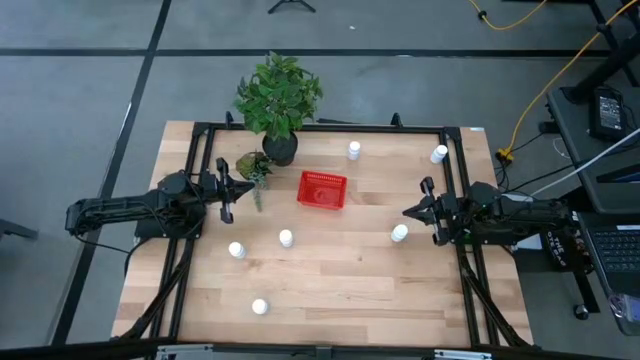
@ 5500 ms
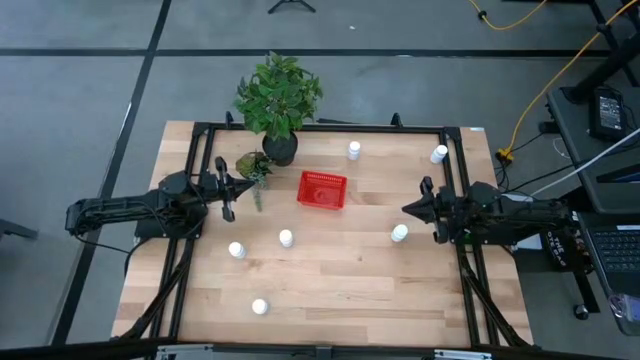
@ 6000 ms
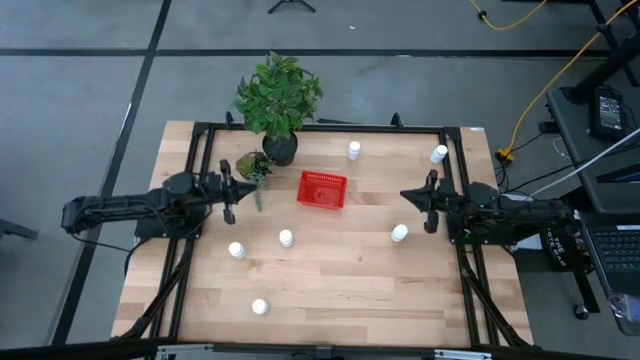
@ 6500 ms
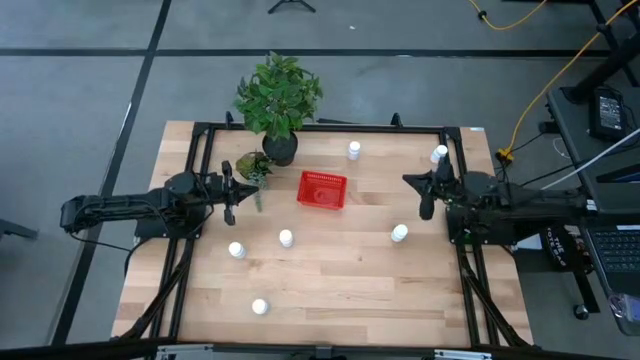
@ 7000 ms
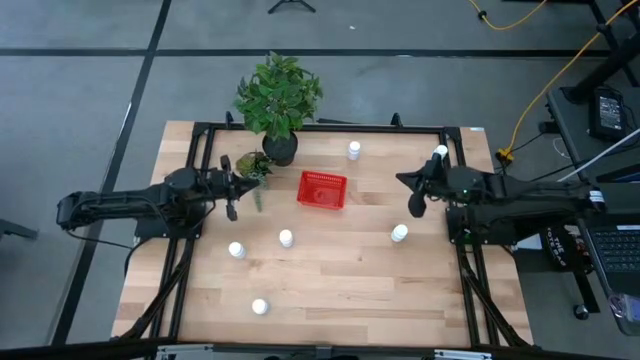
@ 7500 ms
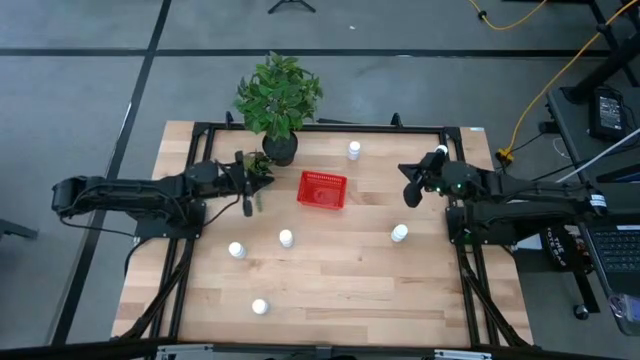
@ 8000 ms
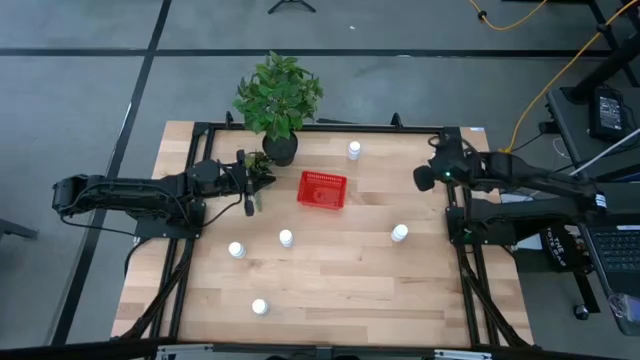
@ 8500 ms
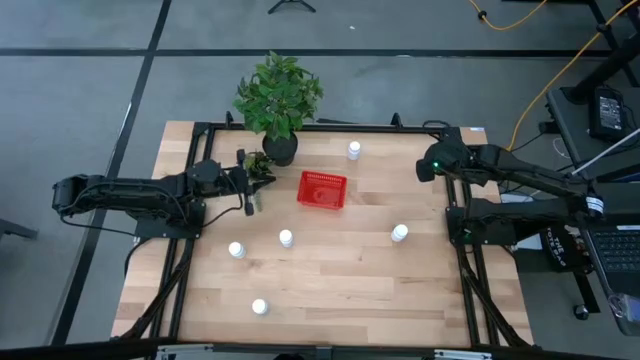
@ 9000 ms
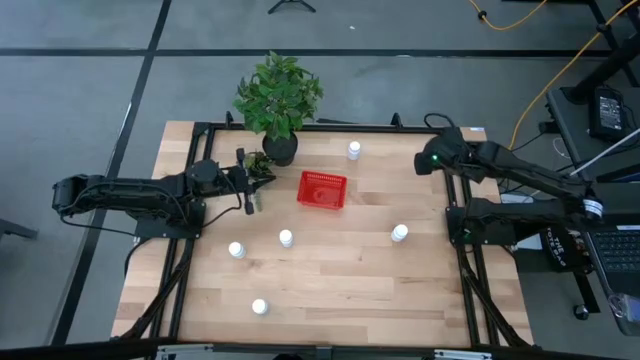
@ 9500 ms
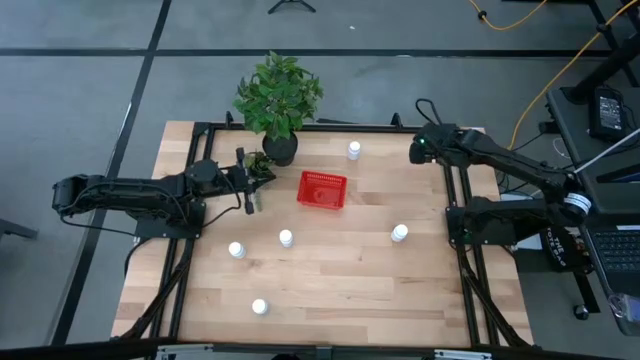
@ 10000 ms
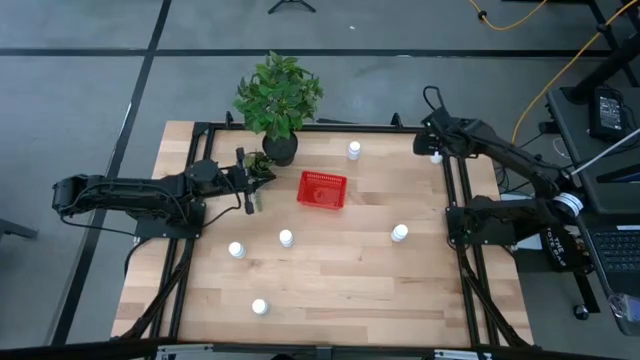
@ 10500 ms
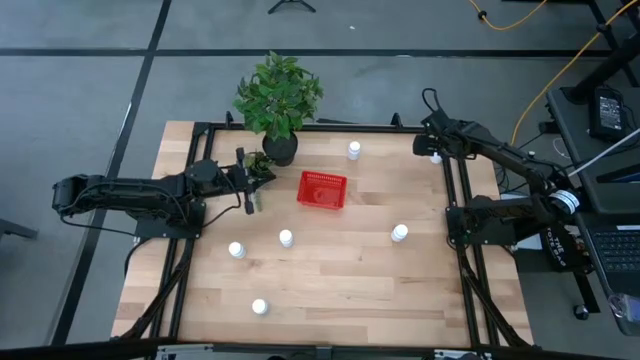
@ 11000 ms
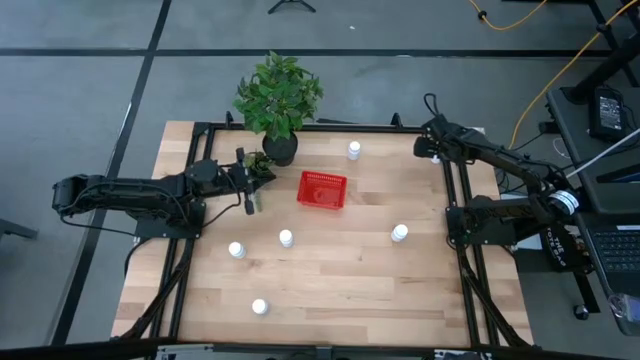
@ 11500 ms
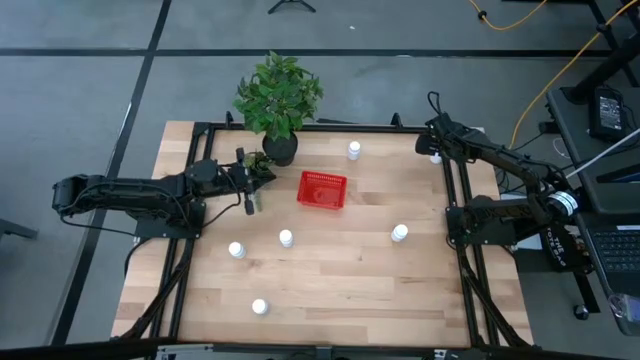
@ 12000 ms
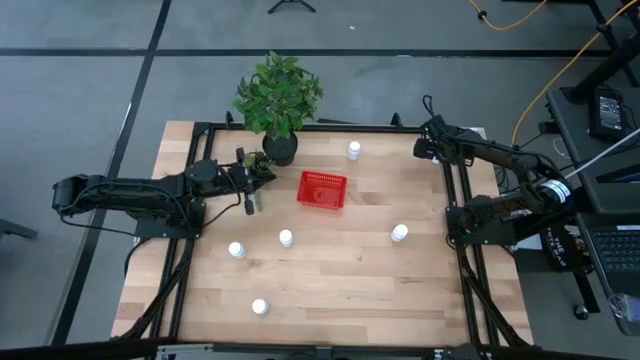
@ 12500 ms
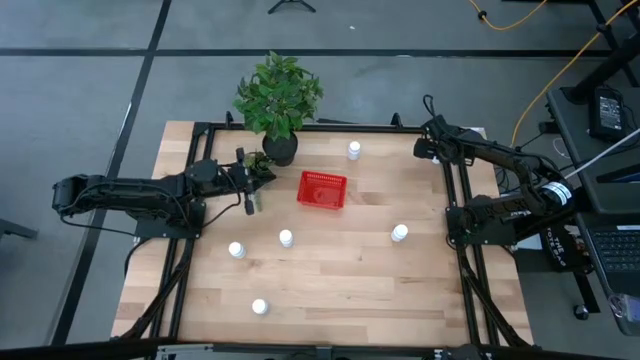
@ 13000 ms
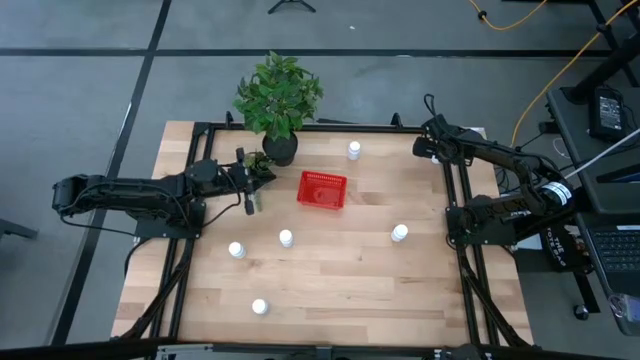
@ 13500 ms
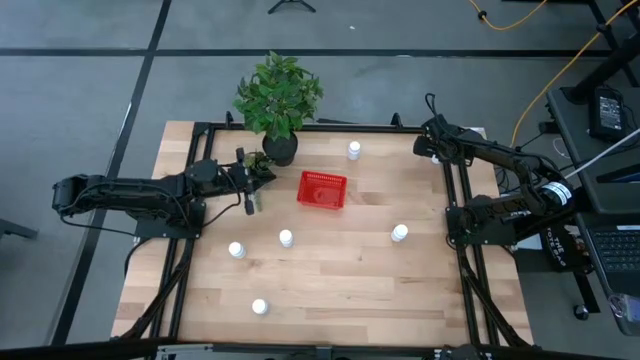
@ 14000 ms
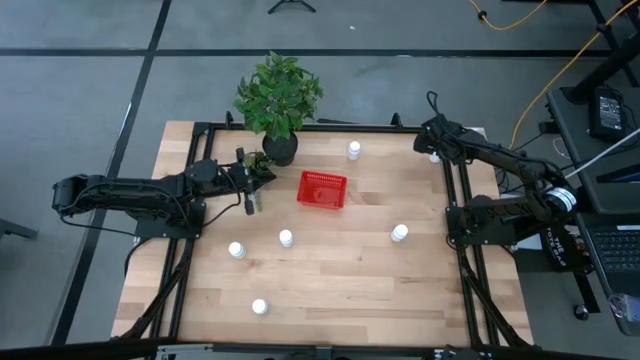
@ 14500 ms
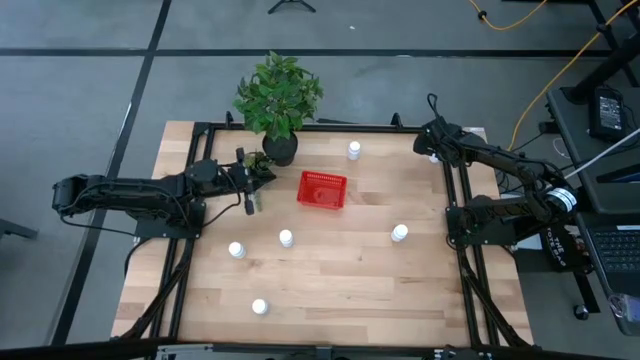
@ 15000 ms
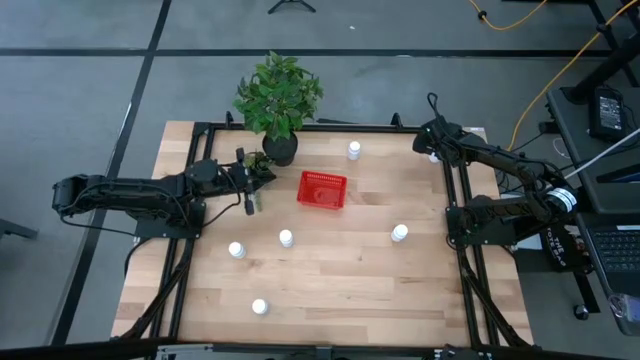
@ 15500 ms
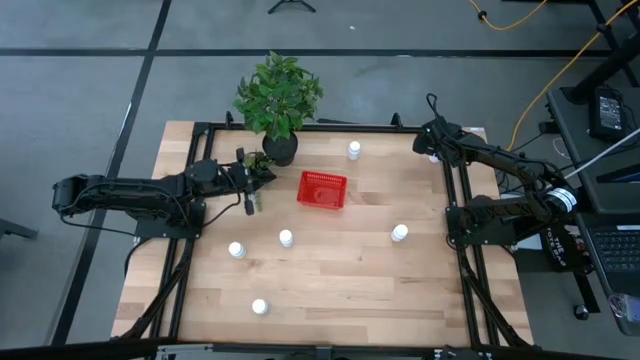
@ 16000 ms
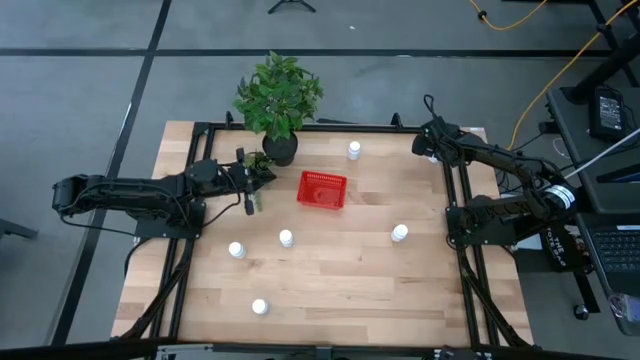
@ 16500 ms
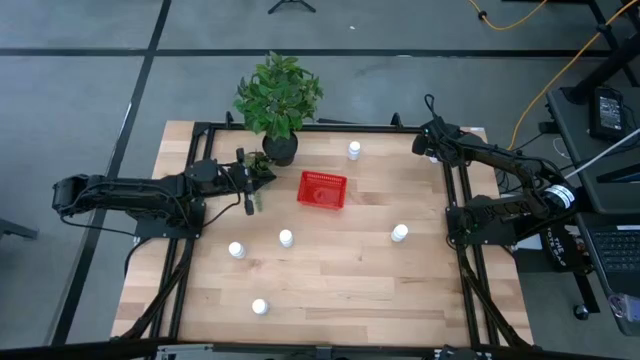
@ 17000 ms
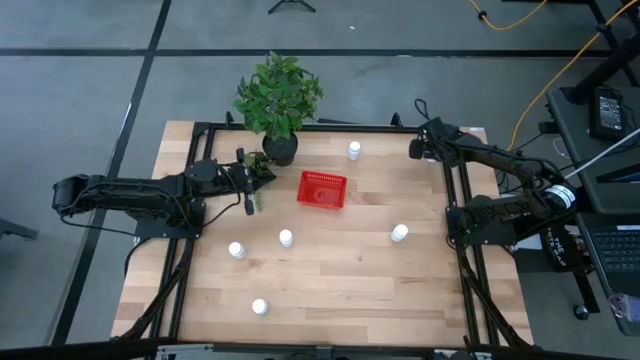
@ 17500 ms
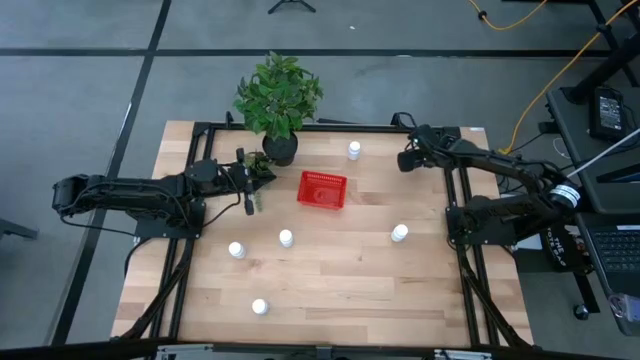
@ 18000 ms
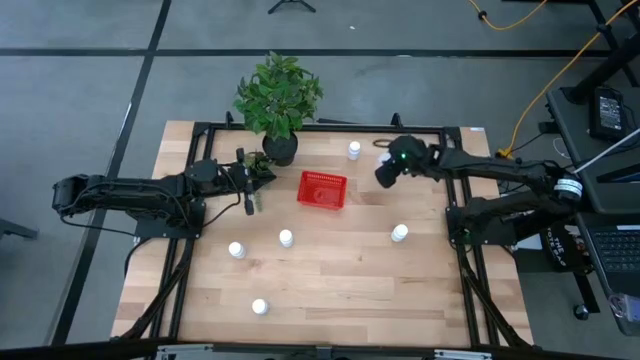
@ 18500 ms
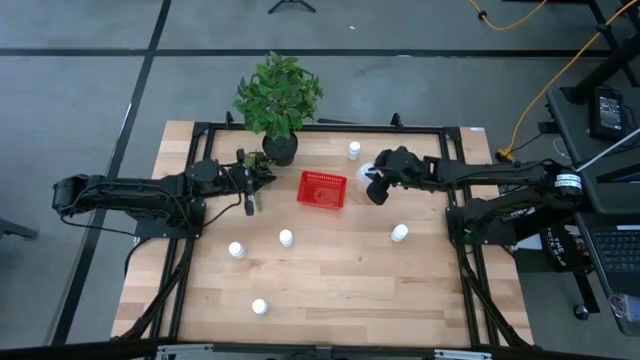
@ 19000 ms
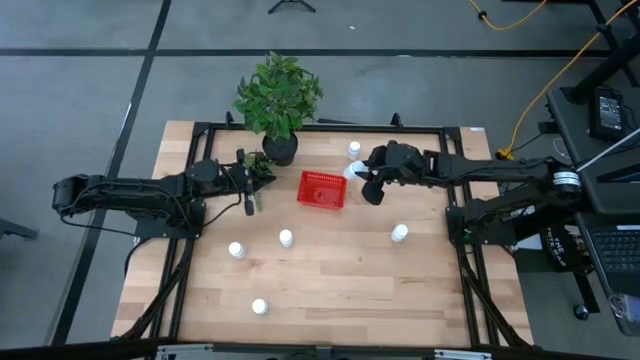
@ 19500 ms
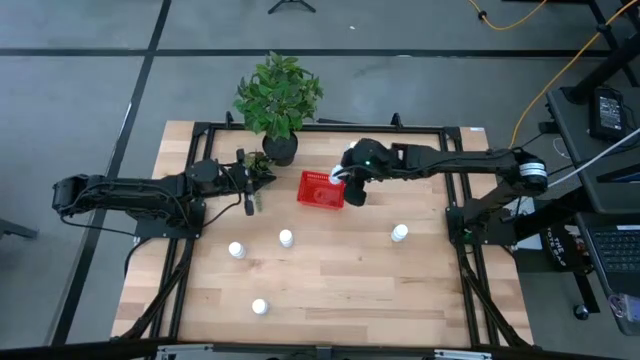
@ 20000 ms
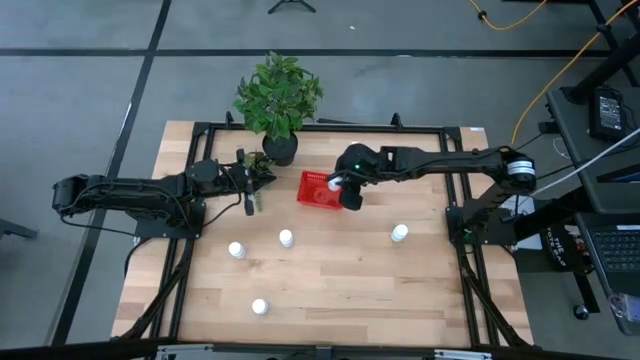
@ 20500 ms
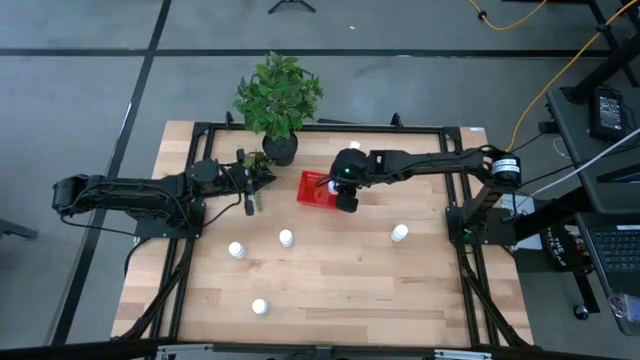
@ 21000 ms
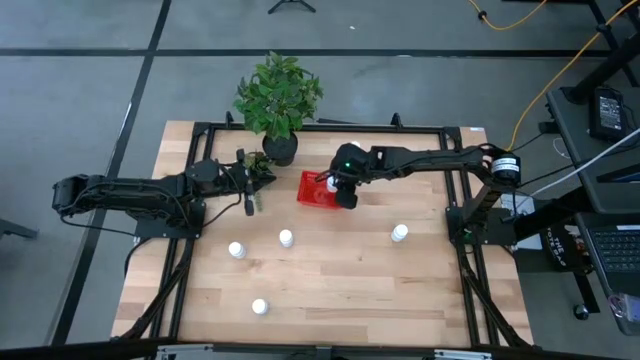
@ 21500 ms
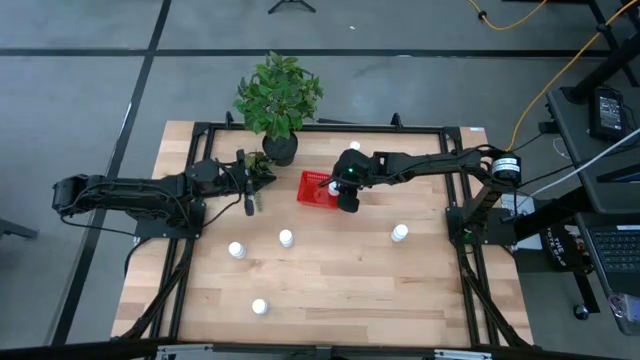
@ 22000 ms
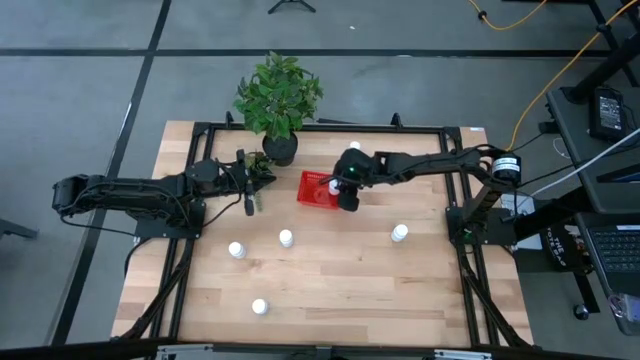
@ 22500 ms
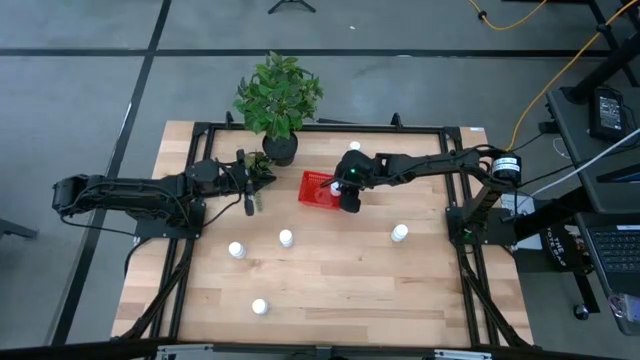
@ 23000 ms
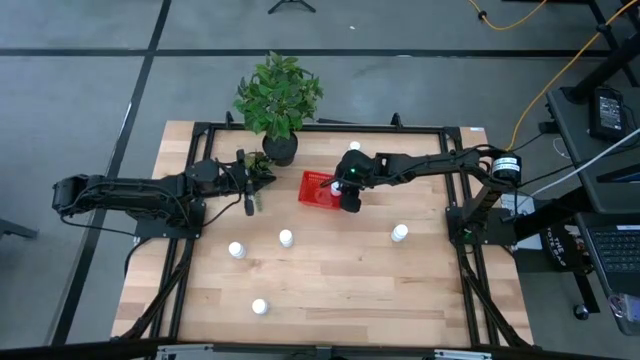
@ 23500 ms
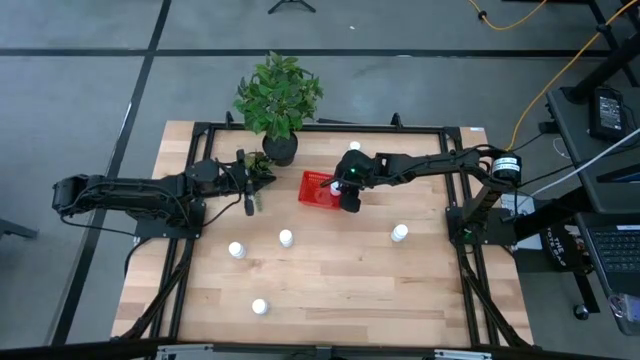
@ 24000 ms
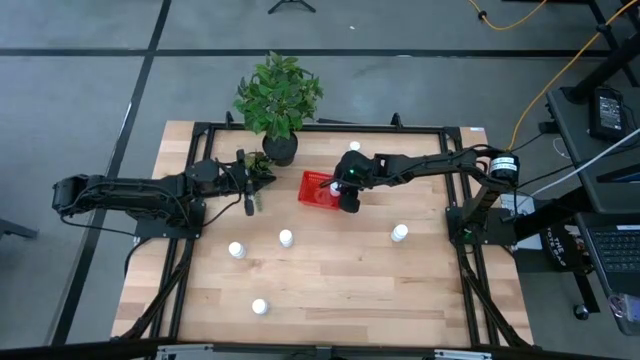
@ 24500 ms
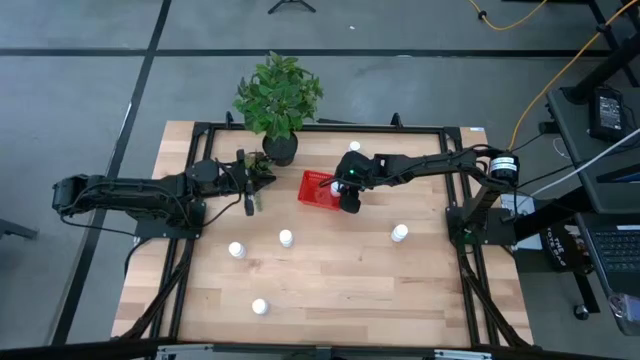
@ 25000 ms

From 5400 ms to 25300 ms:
Task: Pick and place pill bottles into a basket
Put the white medicine bottle into the red bin

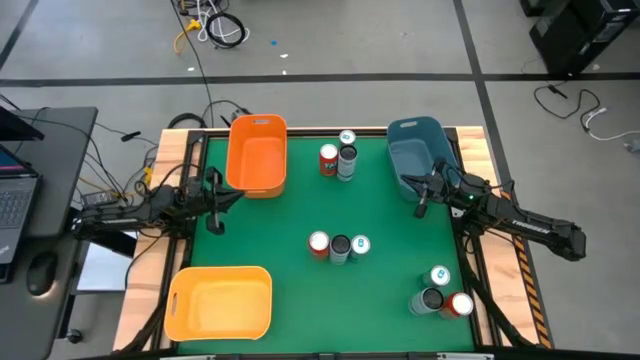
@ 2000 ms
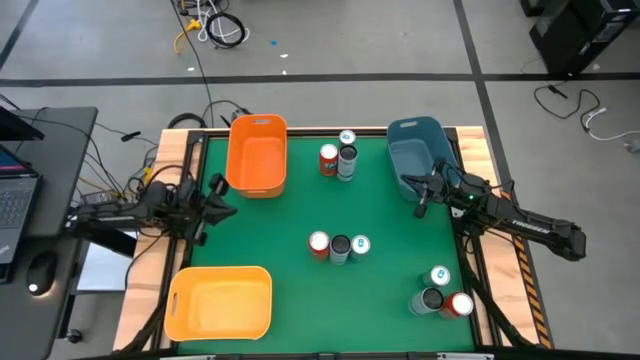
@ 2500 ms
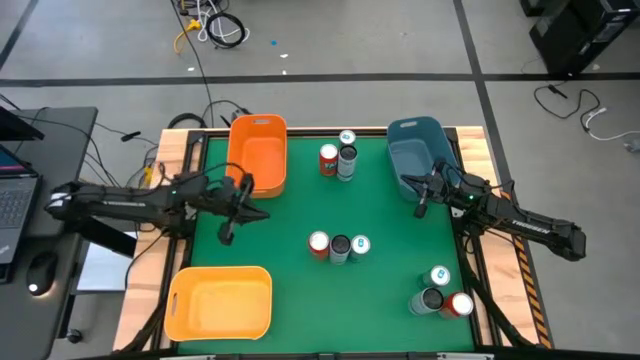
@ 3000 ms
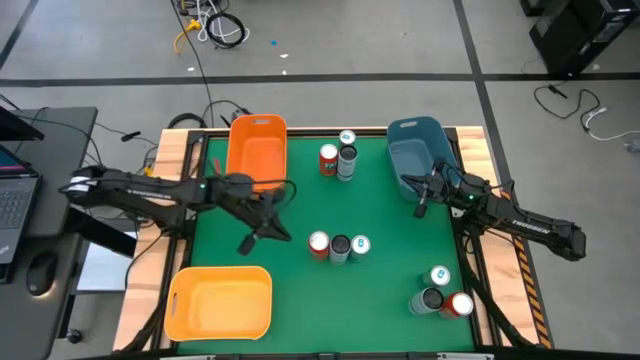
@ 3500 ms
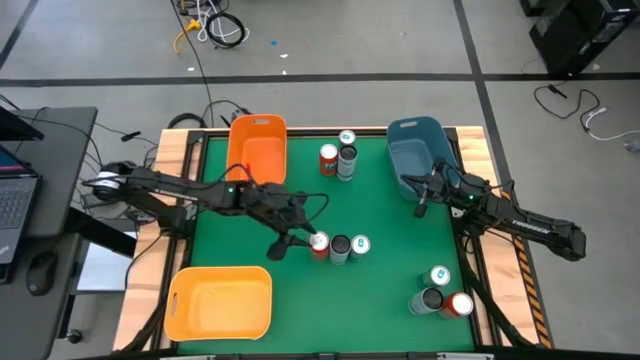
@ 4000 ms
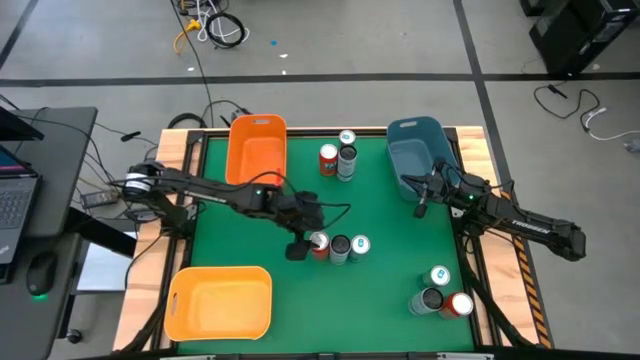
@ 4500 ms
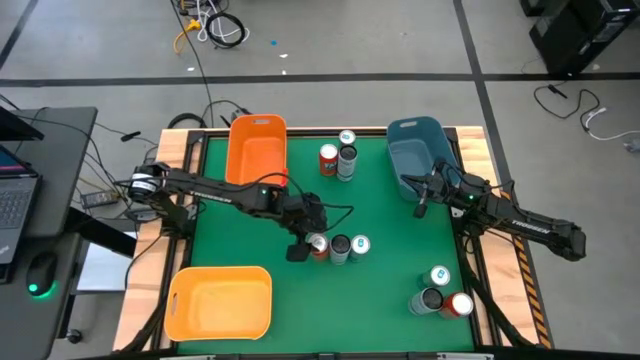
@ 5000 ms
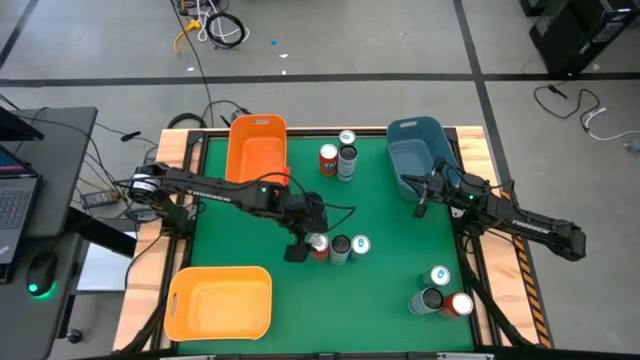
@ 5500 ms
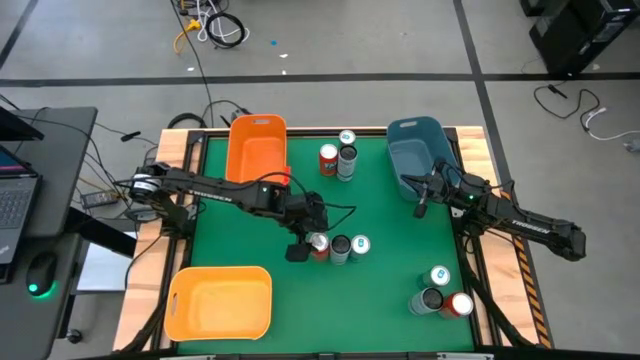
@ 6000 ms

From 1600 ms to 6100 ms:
Task: Sort soda cans
Put the middle left orange soda can into the yellow bin
